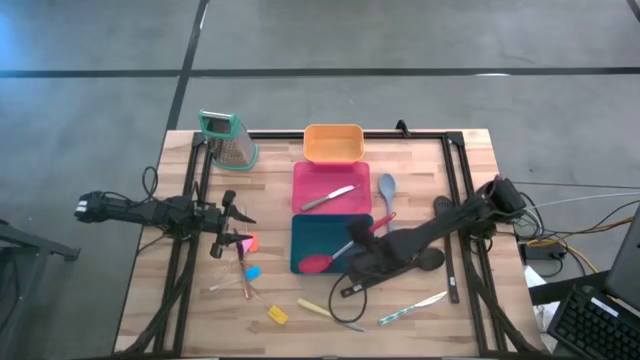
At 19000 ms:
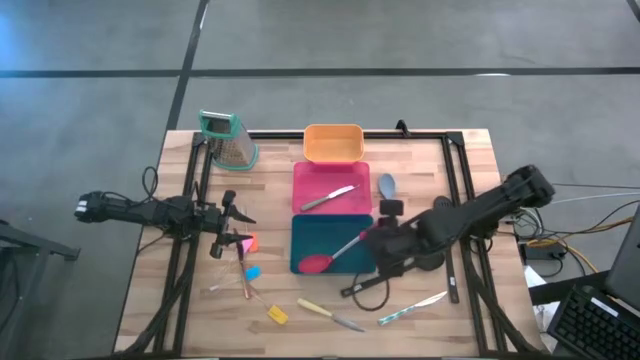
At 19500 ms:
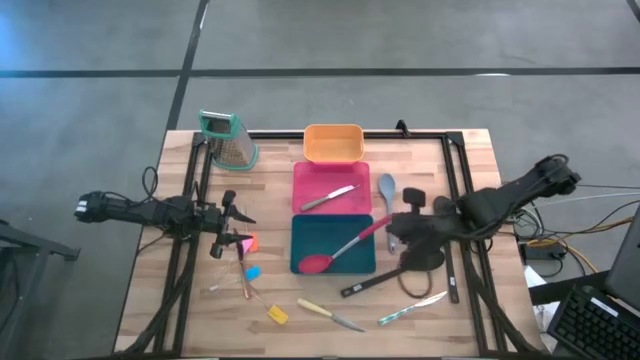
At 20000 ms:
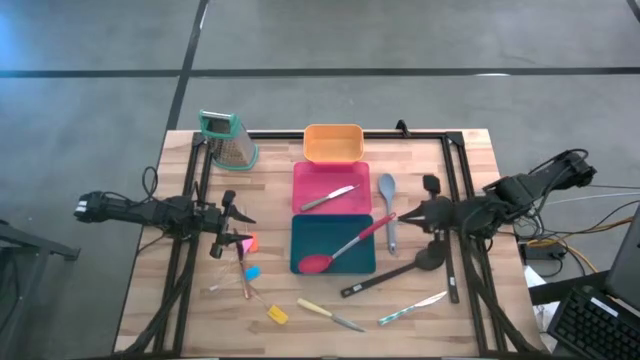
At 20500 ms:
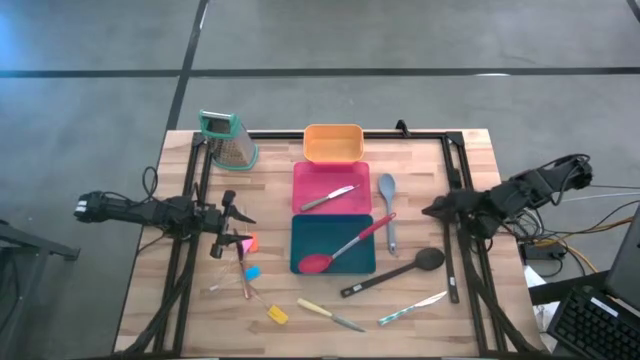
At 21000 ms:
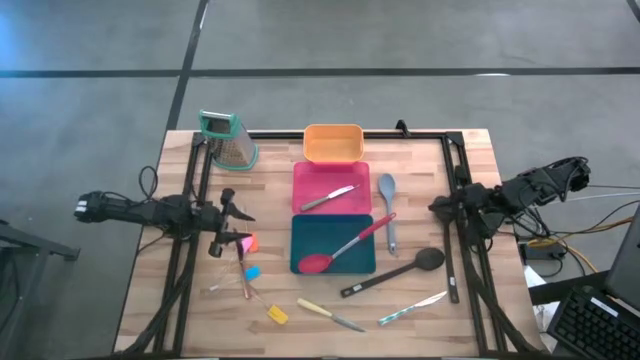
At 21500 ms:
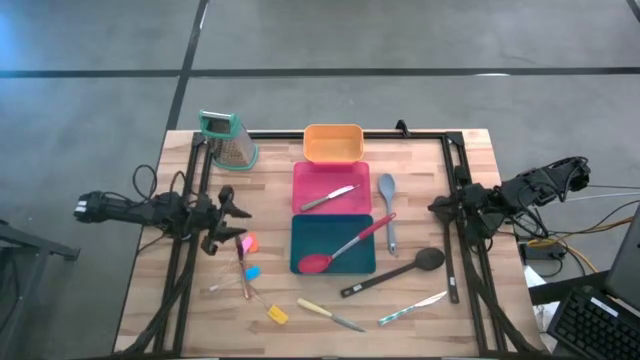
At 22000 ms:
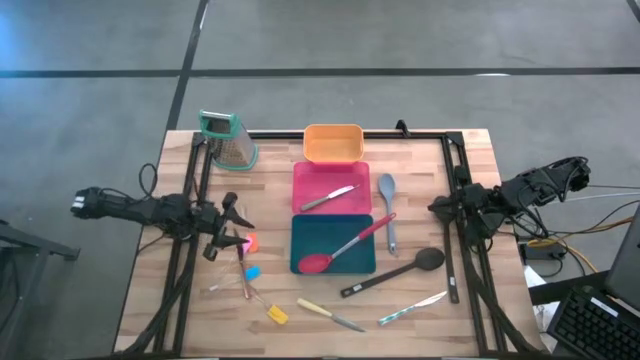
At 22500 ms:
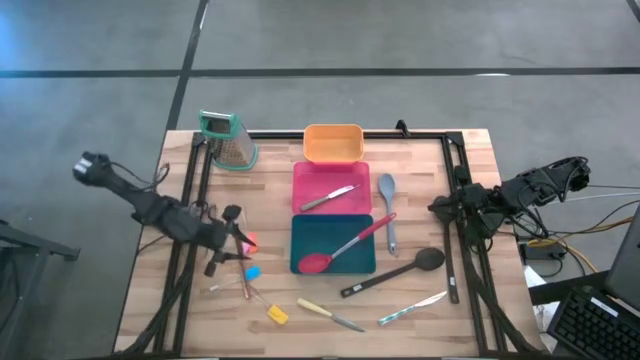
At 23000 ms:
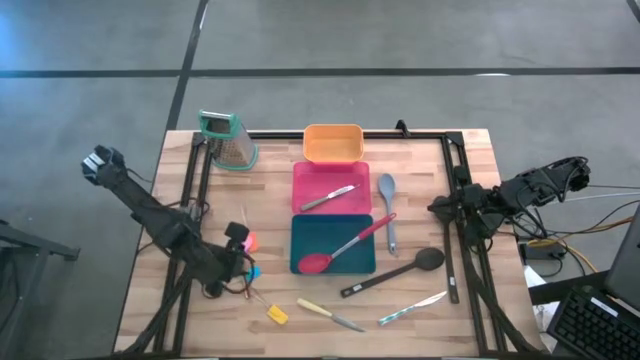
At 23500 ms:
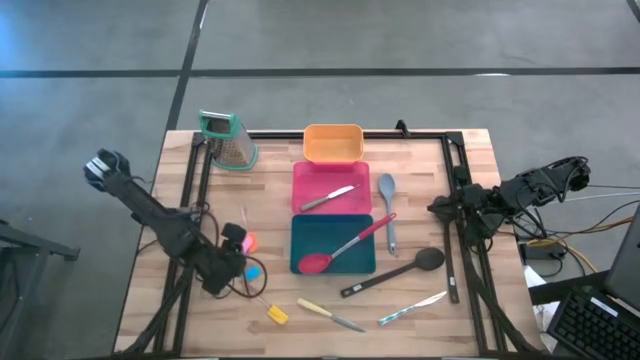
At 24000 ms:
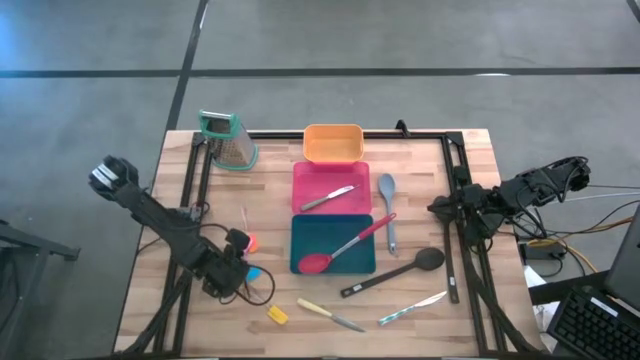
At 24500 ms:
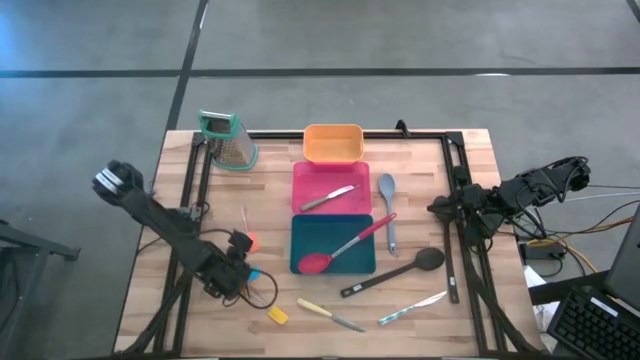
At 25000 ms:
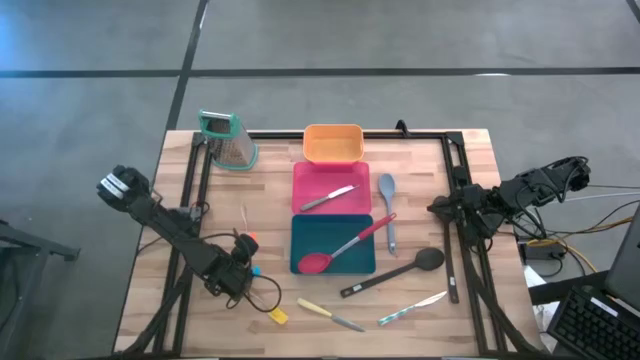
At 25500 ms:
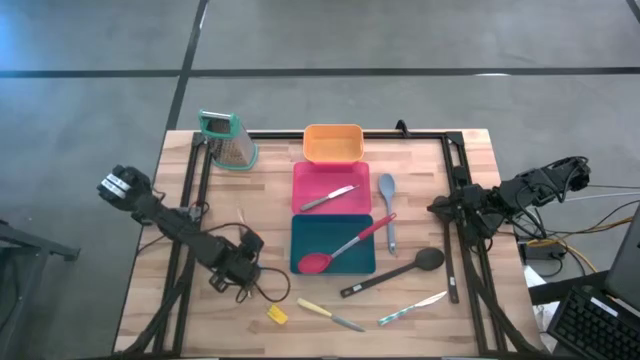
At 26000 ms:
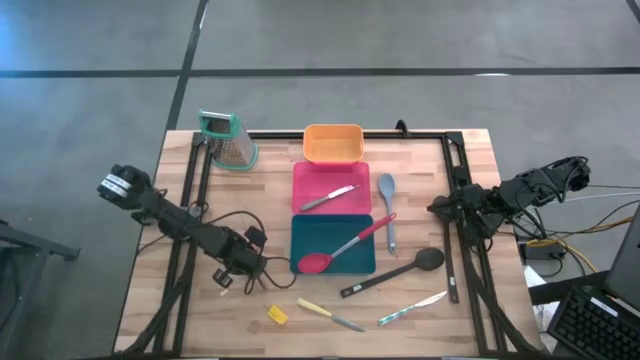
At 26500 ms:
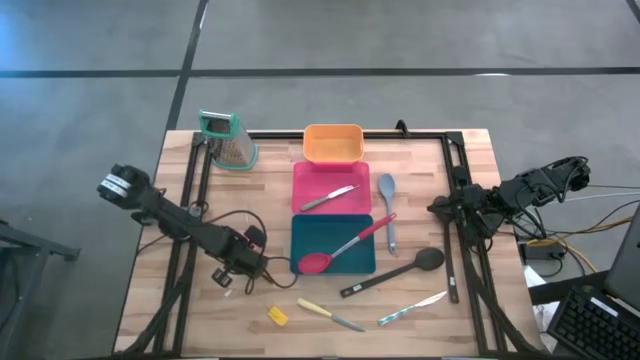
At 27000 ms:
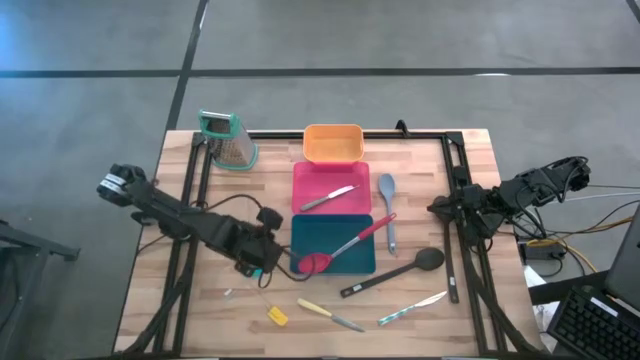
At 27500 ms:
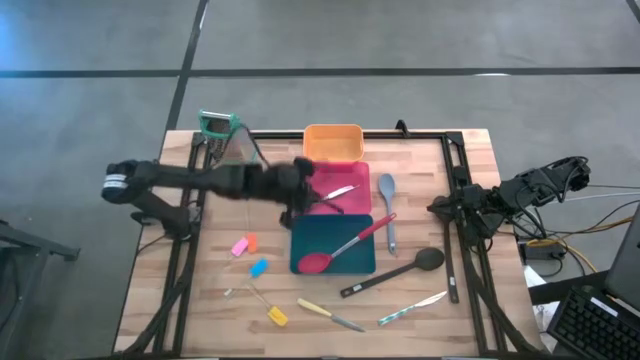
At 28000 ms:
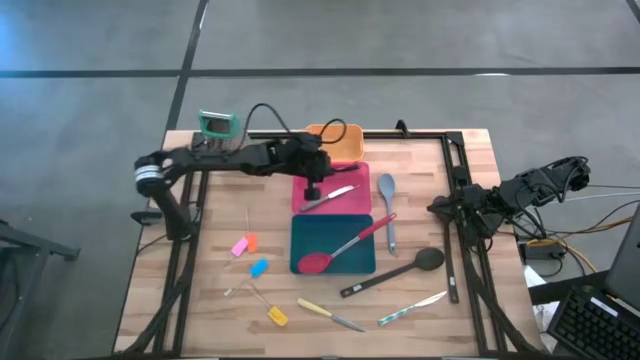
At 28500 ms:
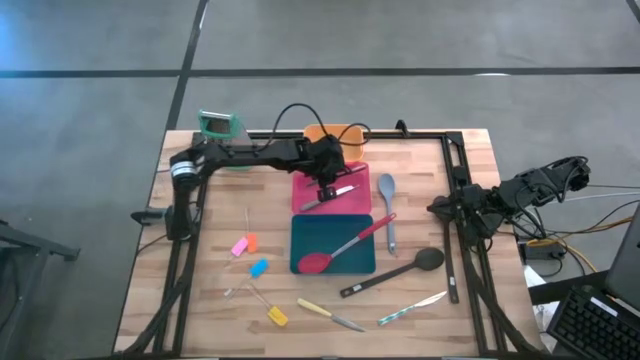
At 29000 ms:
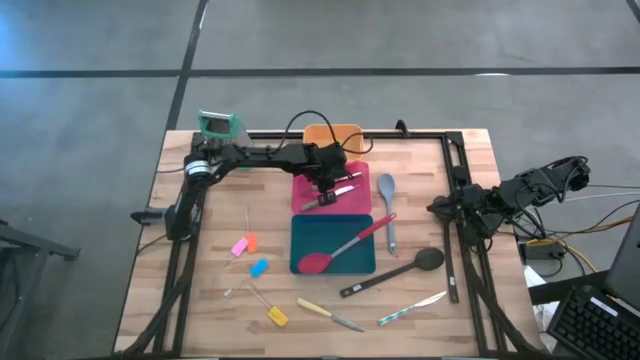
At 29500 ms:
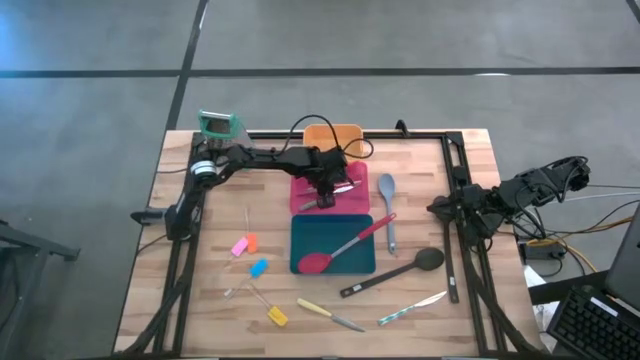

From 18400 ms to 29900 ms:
Task: Pick & Place Kitchen Items
Put the gold knife into the red bin

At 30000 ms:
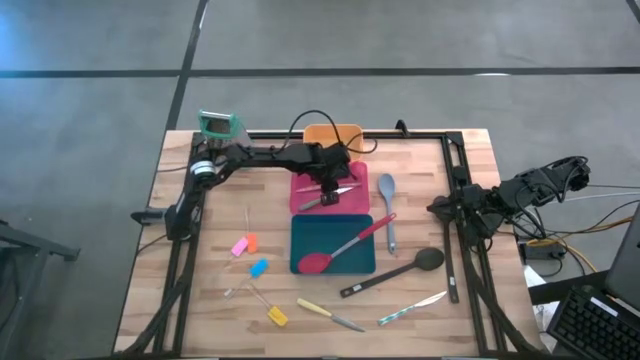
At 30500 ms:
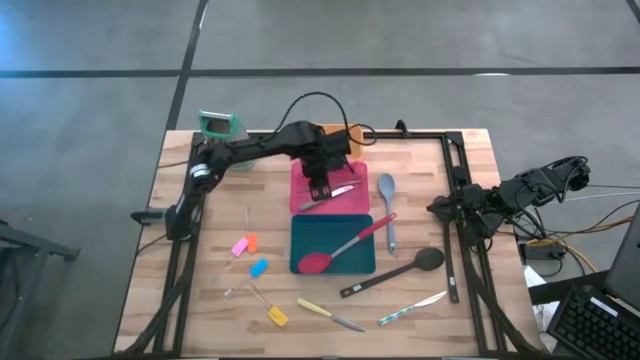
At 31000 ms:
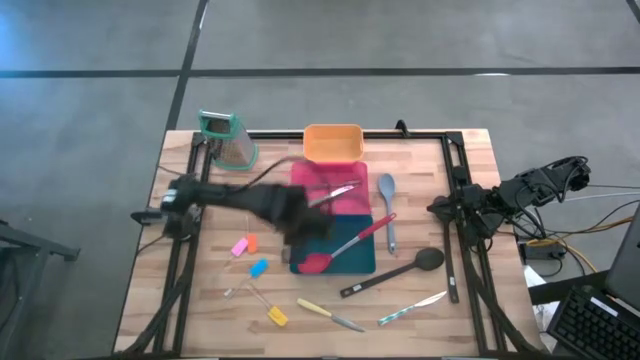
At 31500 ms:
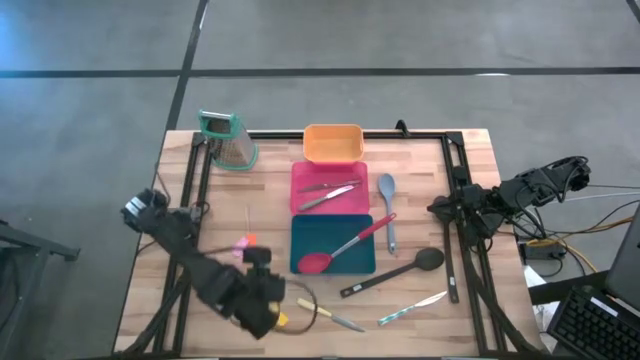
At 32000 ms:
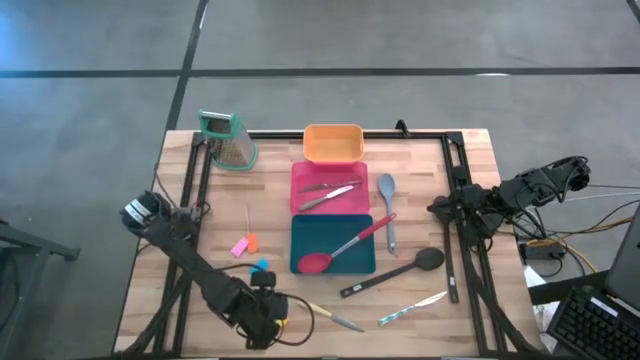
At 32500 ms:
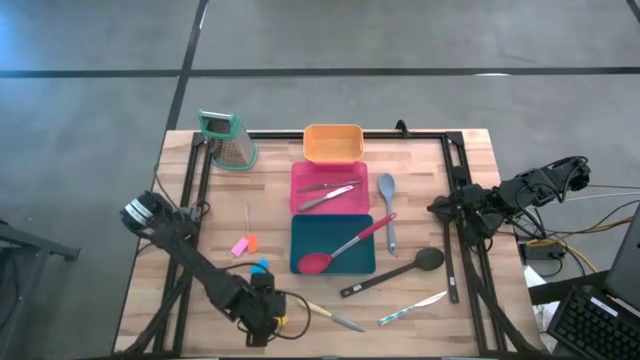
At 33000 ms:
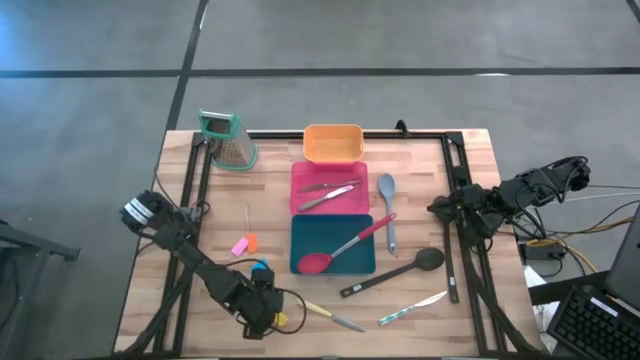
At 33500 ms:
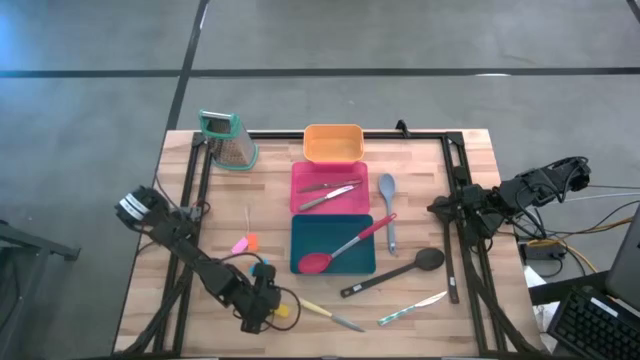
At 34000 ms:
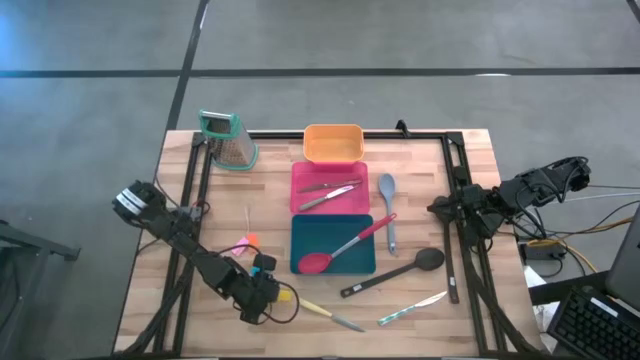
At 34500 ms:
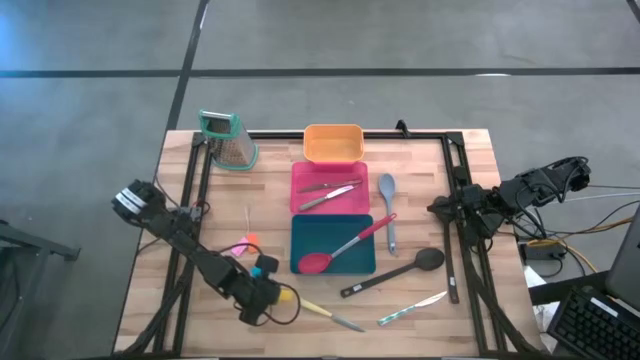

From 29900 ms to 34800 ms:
Put the yellow spatula into the yellow bin

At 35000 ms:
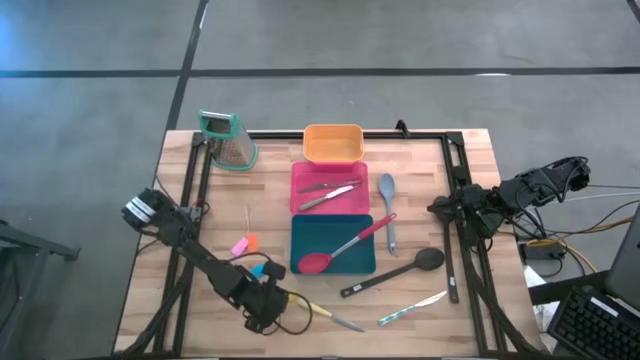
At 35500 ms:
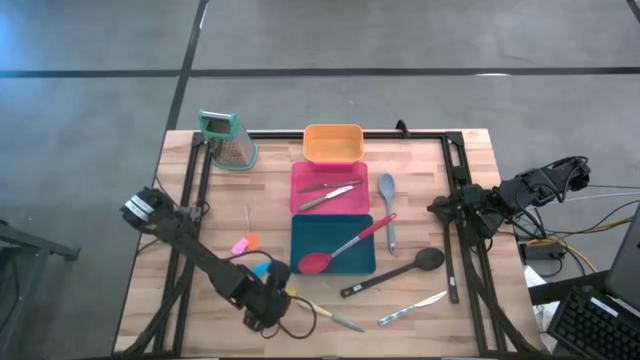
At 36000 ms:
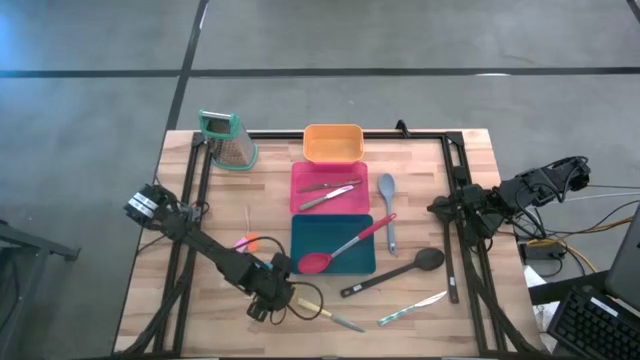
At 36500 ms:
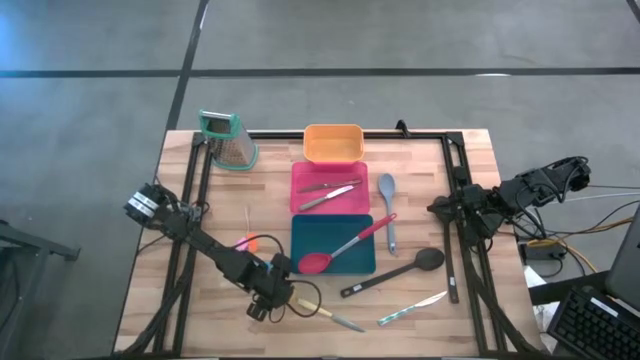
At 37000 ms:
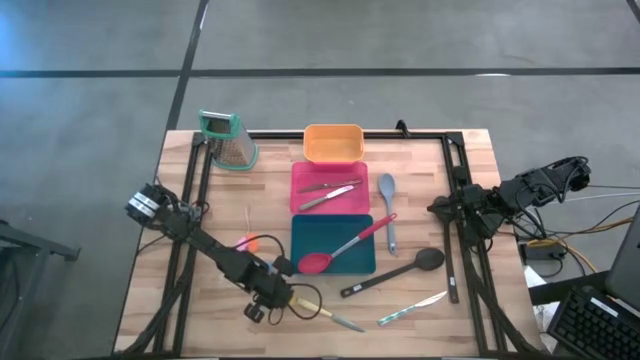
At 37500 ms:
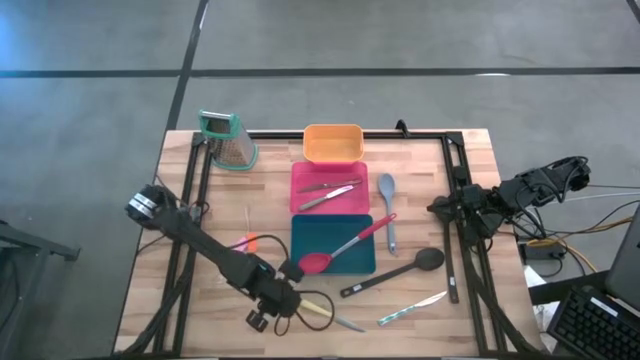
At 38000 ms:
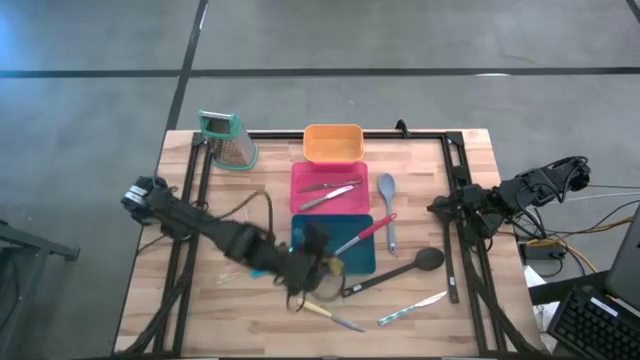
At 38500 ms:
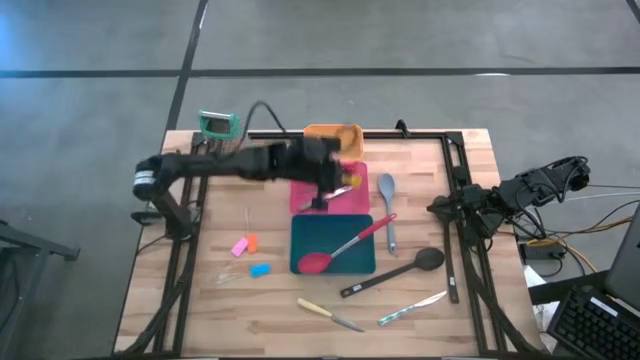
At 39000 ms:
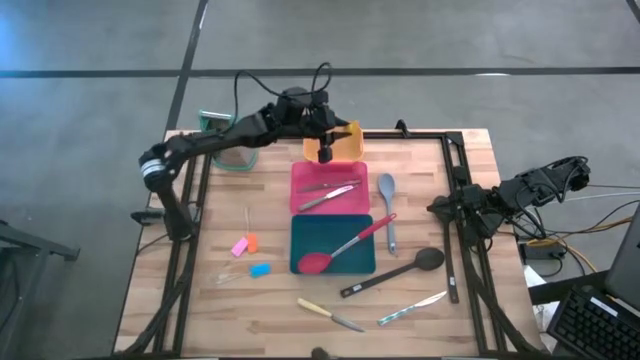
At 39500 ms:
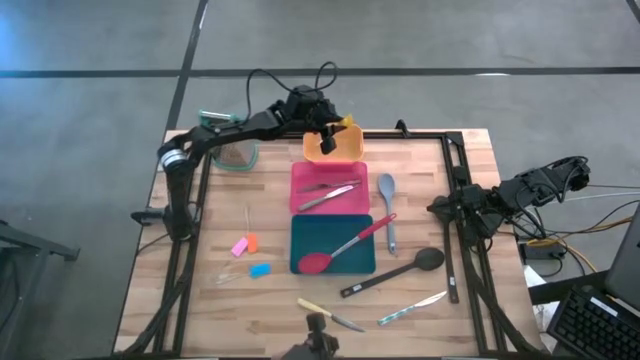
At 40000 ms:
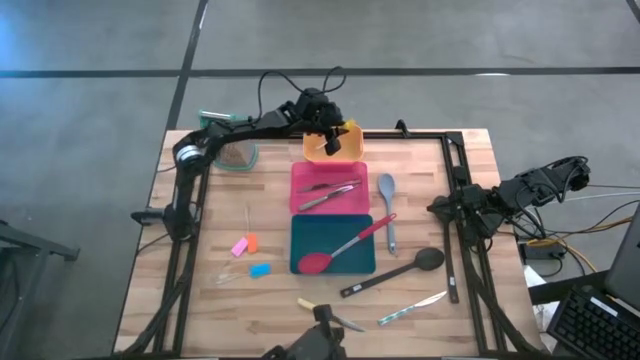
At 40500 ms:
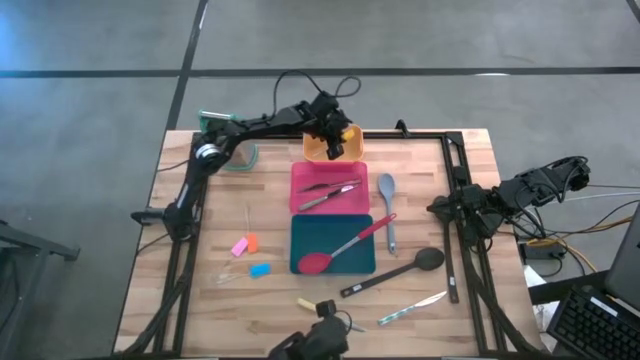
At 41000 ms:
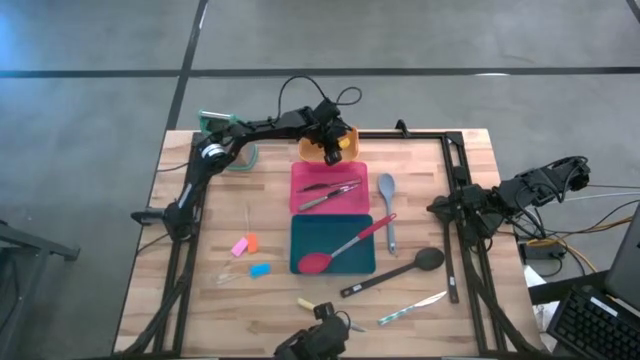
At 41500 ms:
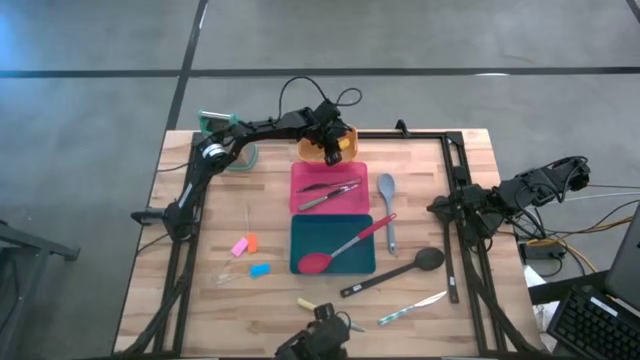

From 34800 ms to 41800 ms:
Put the yellow spatula into the yellow bin
